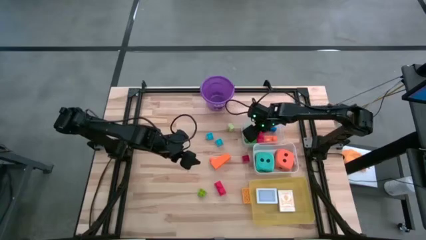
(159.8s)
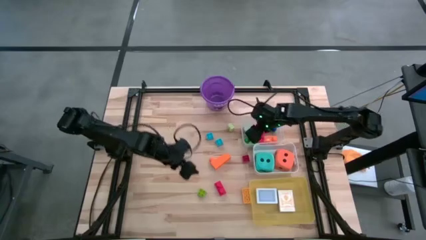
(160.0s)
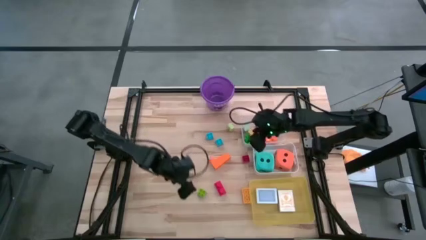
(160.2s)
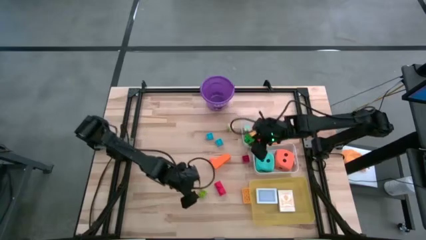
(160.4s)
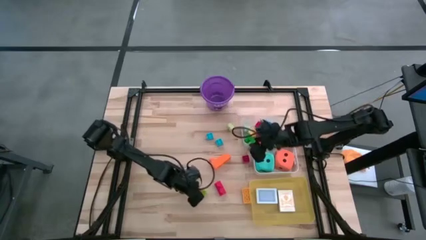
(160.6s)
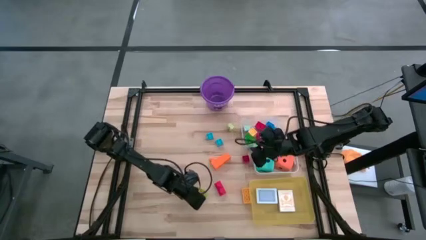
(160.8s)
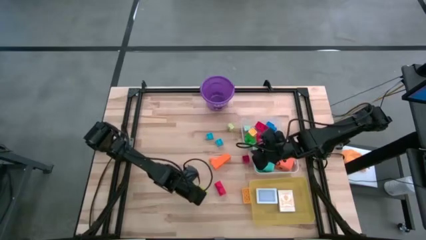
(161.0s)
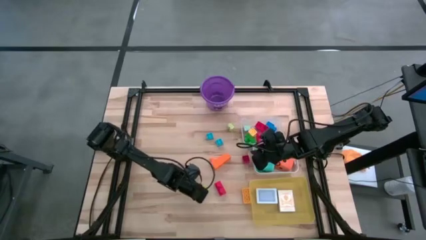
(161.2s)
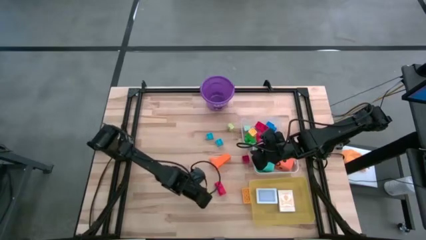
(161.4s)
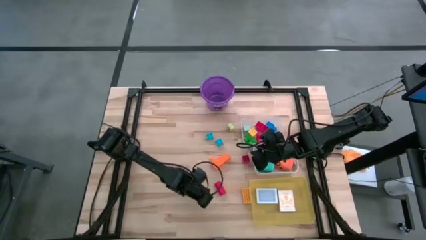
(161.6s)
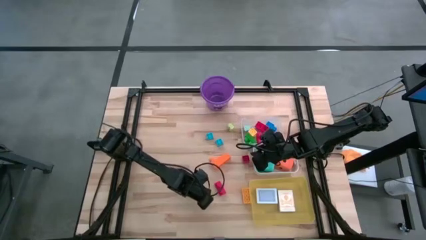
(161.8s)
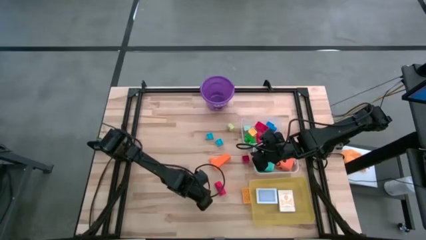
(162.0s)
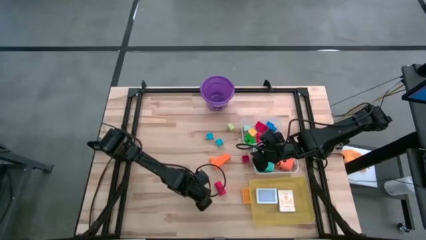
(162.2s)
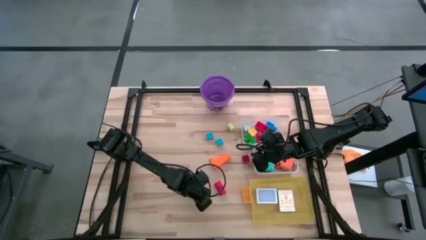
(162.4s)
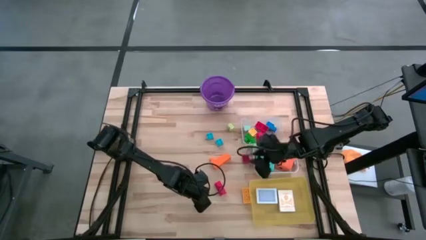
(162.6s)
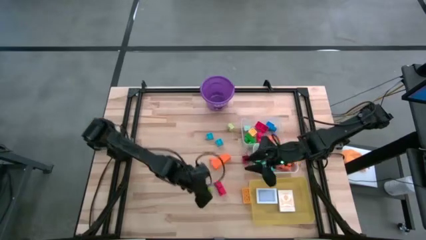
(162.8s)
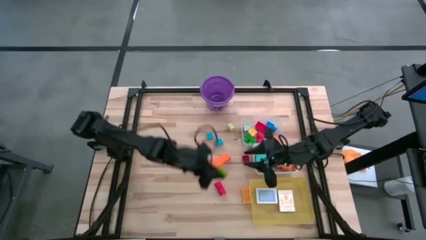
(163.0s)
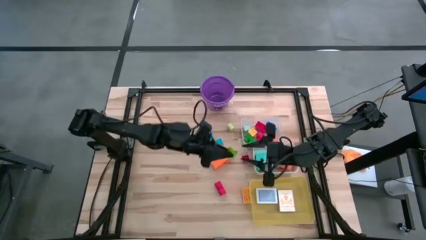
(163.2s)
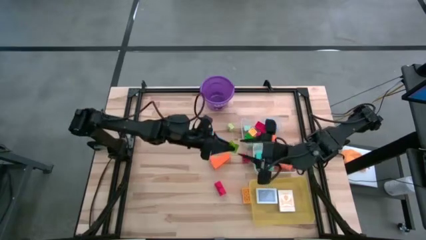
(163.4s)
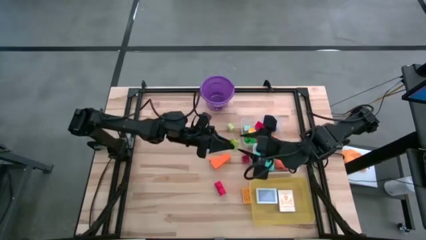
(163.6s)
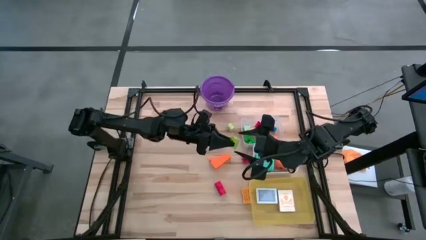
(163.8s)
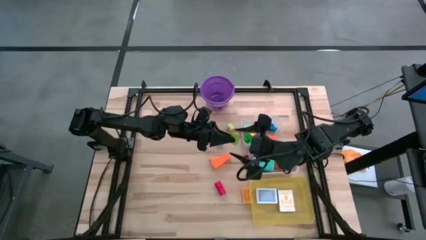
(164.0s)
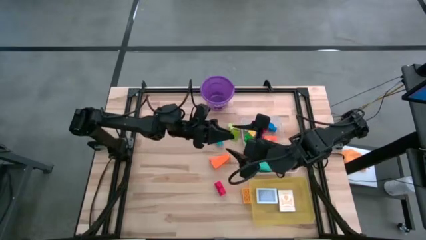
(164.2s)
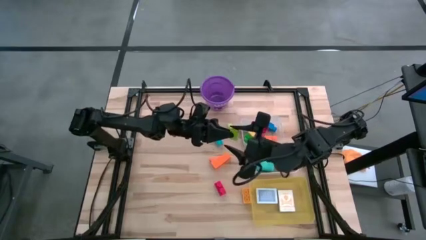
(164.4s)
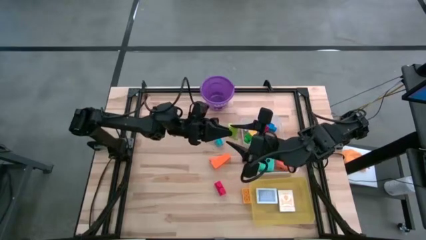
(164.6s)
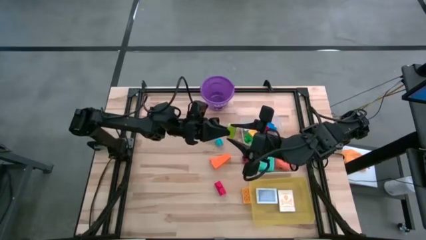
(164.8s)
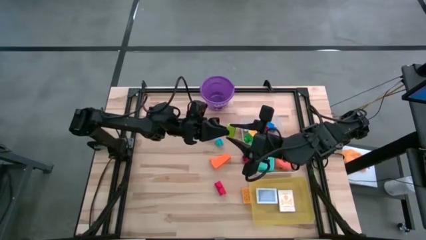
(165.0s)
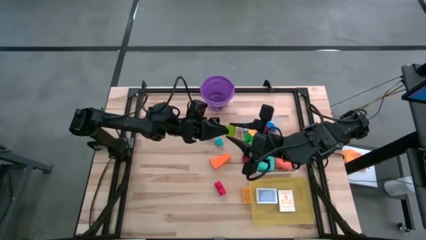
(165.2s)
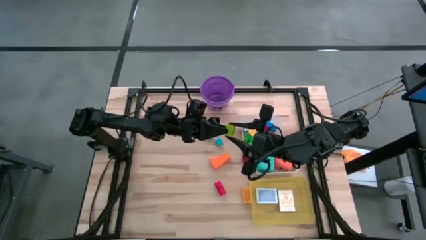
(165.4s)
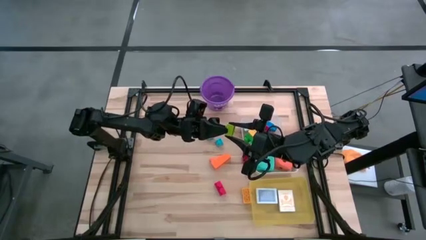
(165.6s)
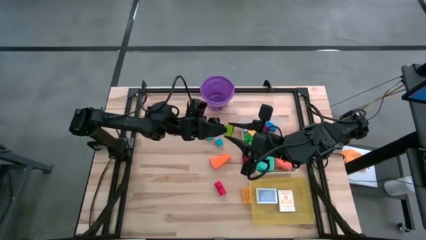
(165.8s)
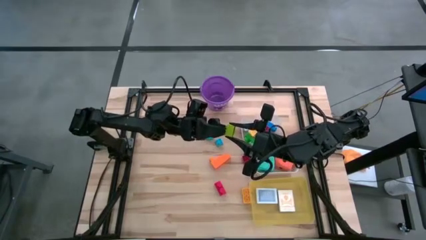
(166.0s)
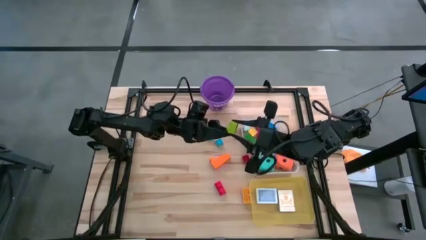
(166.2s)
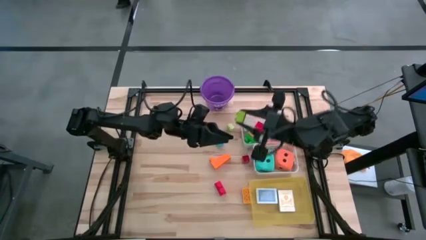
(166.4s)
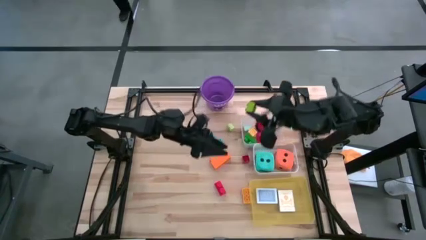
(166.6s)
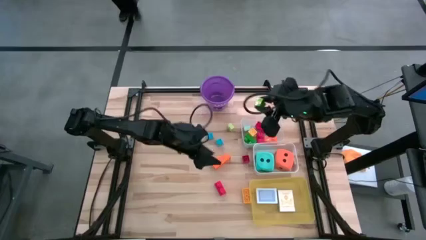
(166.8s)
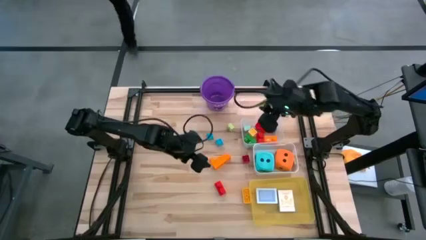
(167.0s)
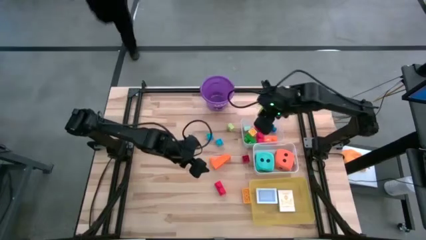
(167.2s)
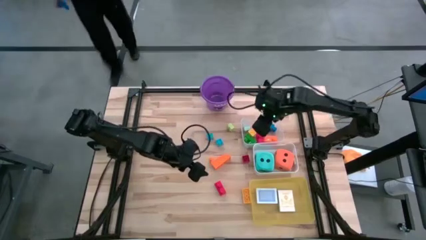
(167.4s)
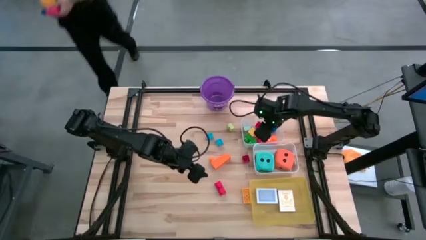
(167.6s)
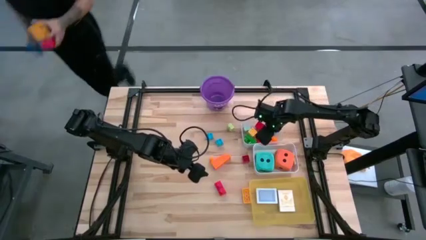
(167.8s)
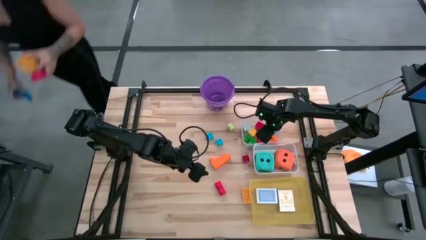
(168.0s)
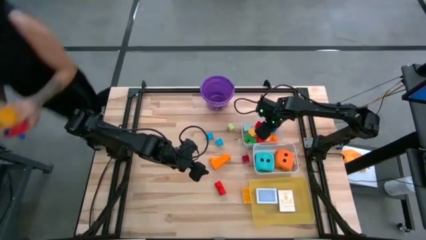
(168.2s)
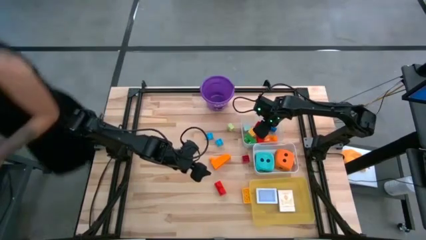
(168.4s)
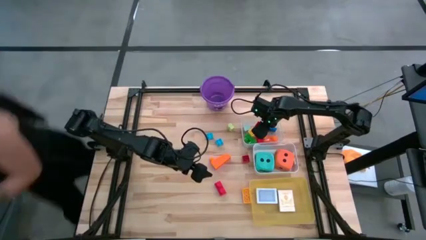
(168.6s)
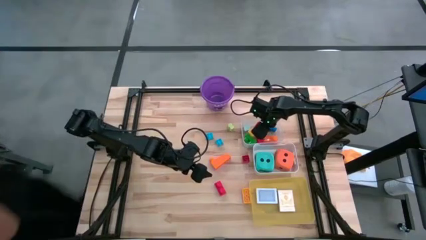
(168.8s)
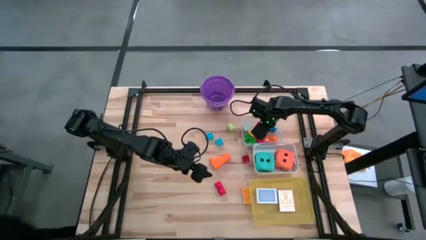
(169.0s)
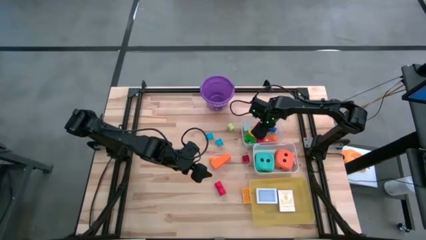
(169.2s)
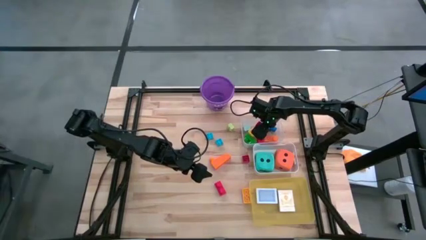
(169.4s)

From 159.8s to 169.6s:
Task: Pick & Place Toys
Put the green game piece into the transparent bin

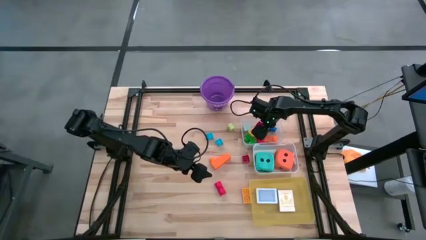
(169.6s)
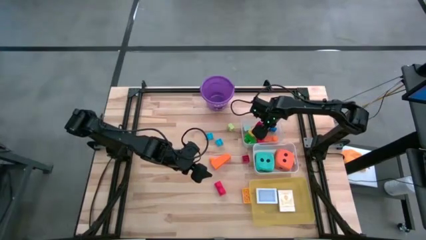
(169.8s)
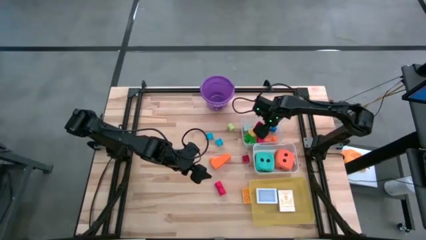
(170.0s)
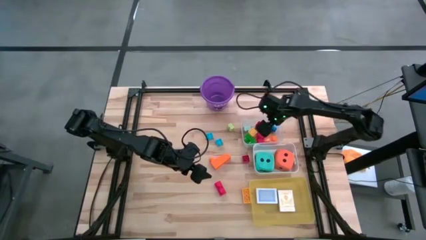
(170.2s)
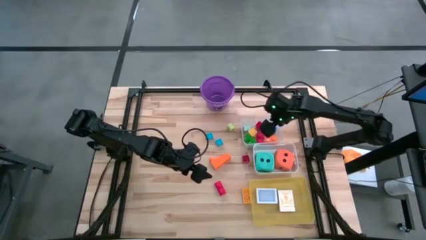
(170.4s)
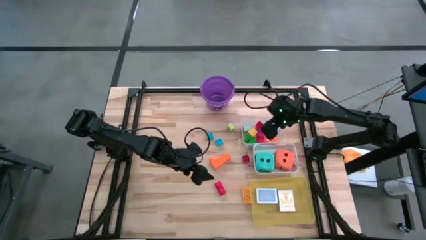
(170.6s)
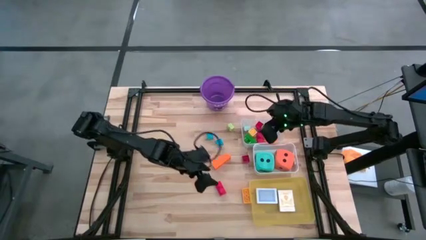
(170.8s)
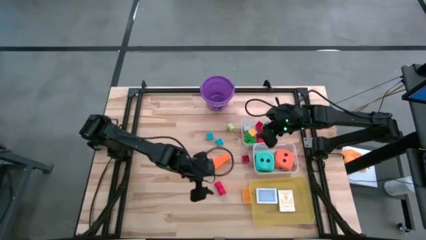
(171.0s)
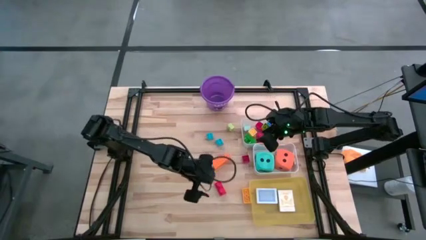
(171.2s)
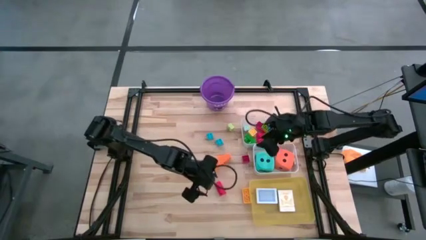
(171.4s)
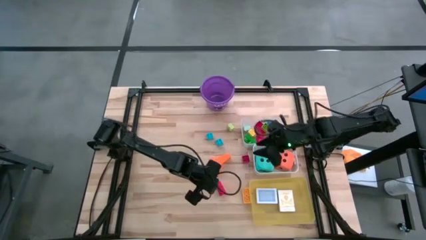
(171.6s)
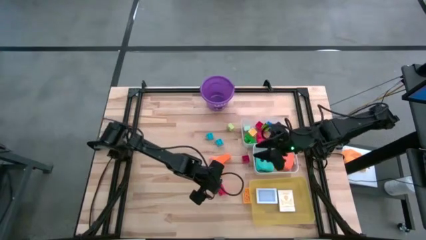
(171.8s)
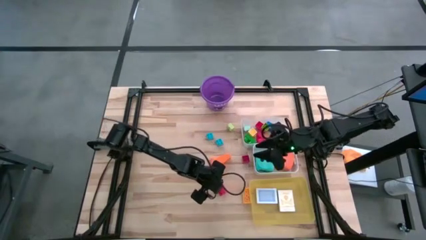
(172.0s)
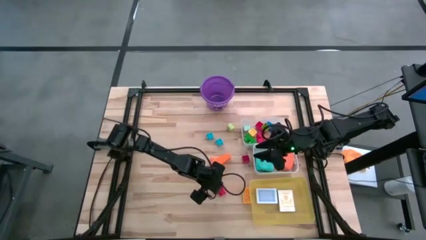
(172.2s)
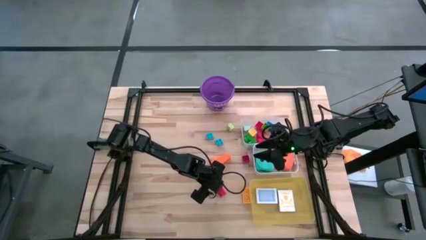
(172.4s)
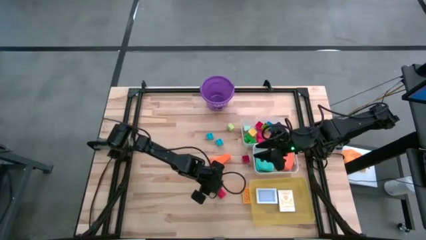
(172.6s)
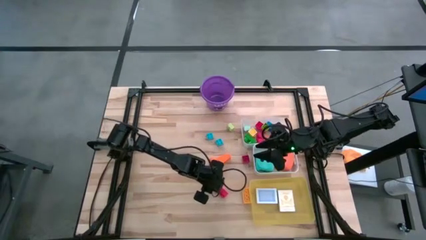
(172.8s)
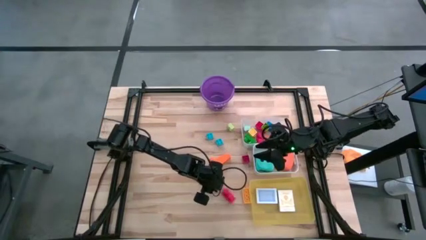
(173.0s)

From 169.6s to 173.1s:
Put the red game piece into the transparent bin

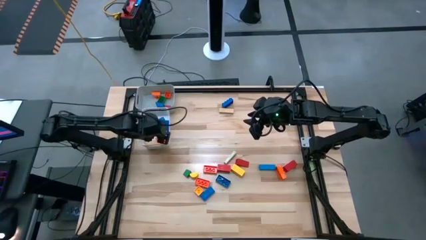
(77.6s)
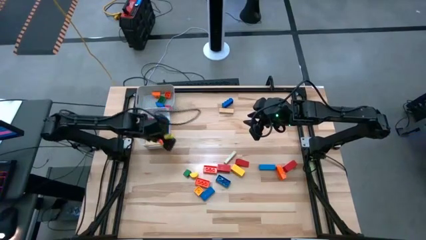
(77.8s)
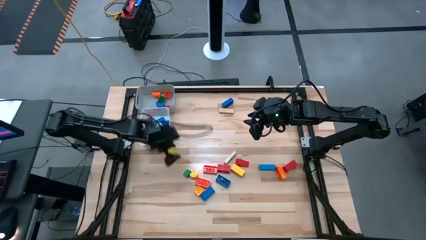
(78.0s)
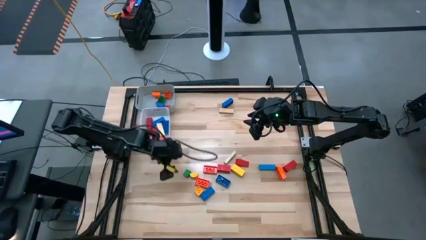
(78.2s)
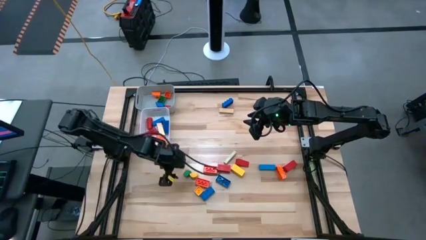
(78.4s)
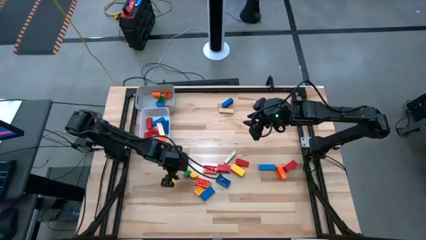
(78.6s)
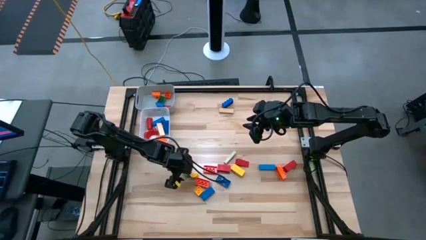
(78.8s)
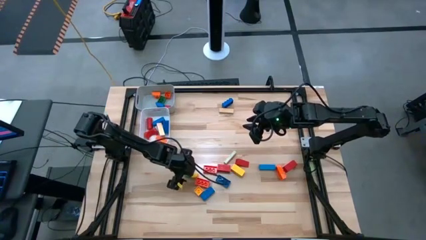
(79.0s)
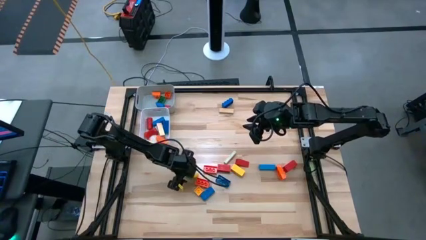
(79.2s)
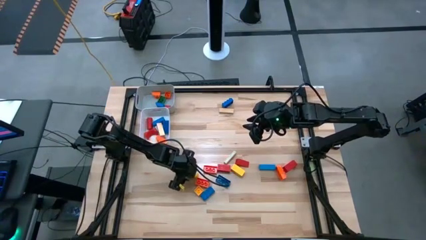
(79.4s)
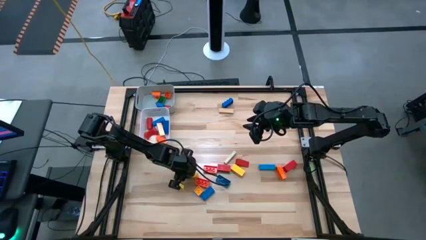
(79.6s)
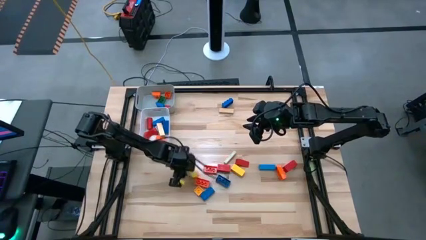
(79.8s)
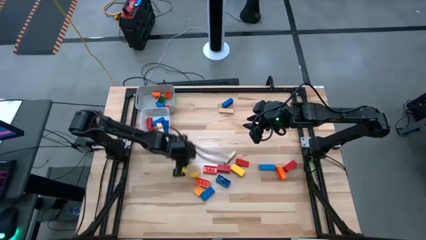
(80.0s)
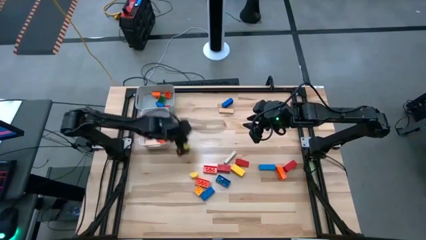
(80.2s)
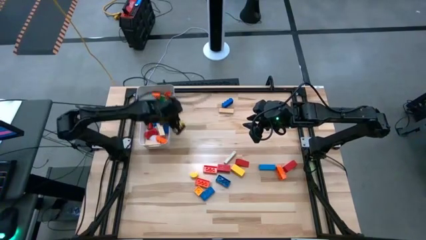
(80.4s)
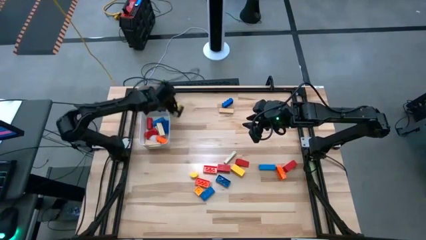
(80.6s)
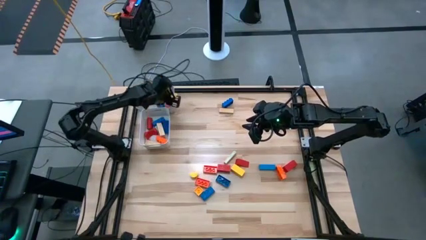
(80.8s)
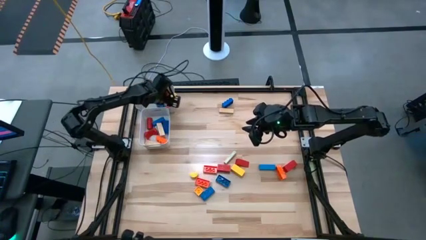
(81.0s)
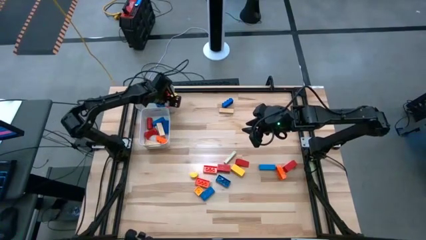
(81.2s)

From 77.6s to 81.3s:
Task: Sort blocks by size
Put the small green wooden block into the gray bin
